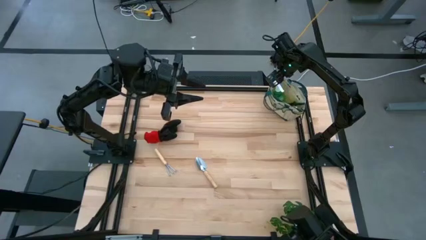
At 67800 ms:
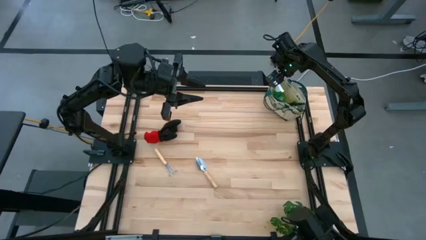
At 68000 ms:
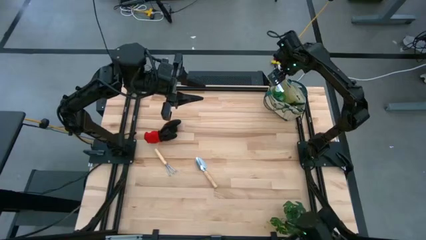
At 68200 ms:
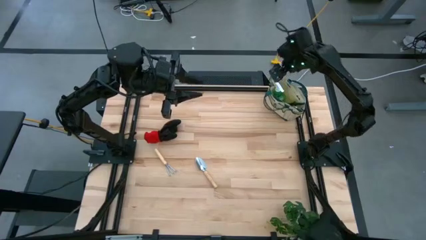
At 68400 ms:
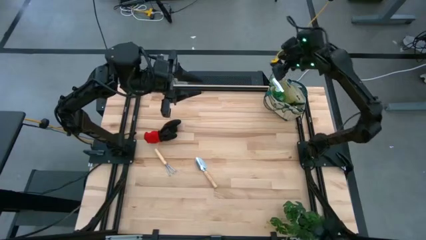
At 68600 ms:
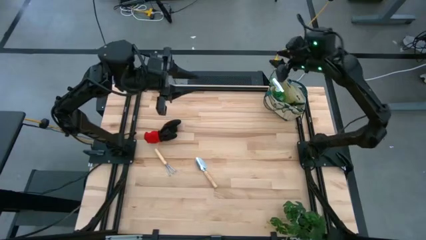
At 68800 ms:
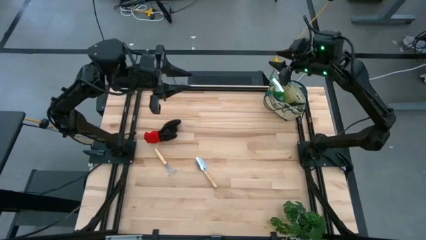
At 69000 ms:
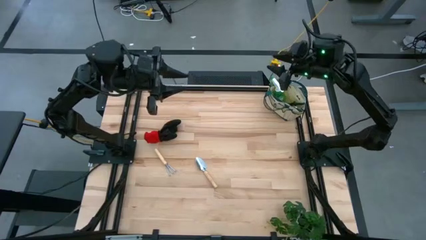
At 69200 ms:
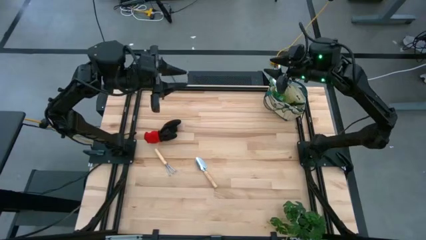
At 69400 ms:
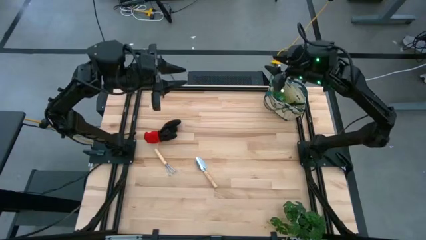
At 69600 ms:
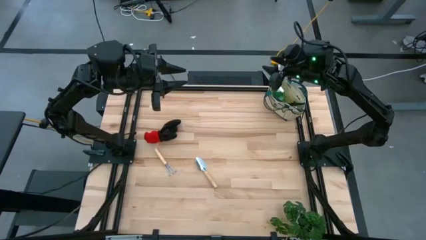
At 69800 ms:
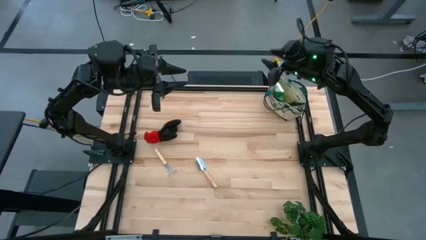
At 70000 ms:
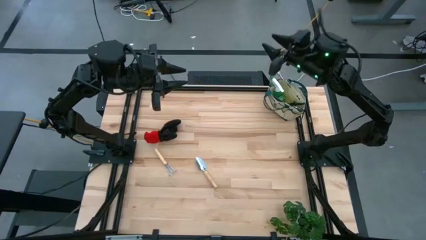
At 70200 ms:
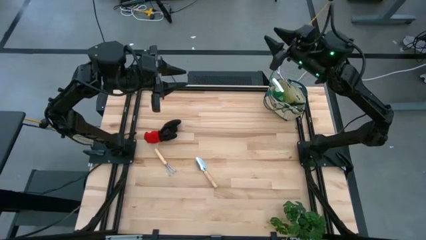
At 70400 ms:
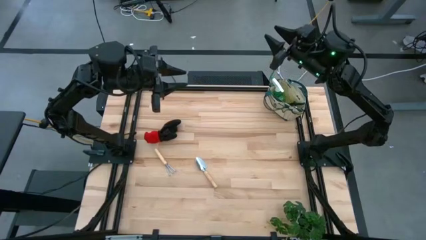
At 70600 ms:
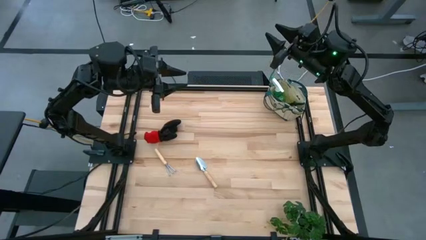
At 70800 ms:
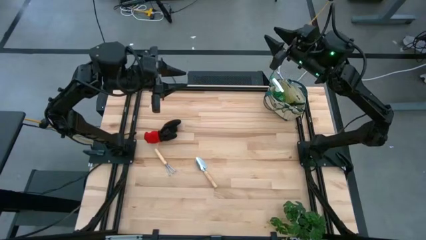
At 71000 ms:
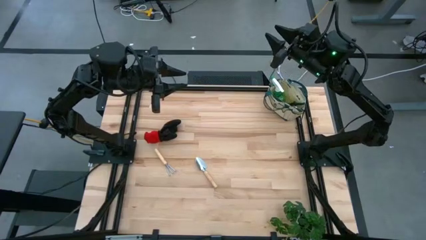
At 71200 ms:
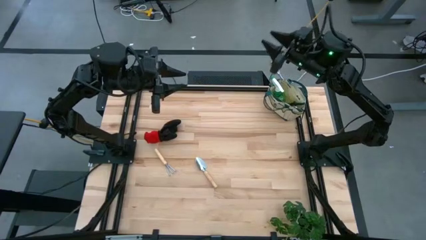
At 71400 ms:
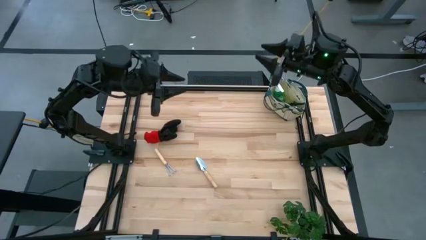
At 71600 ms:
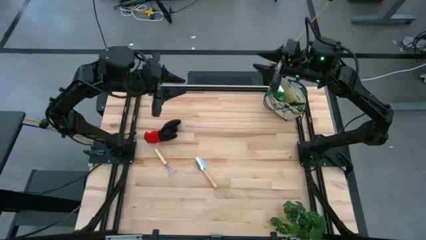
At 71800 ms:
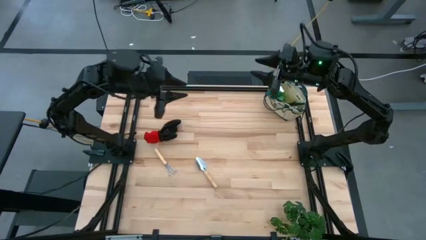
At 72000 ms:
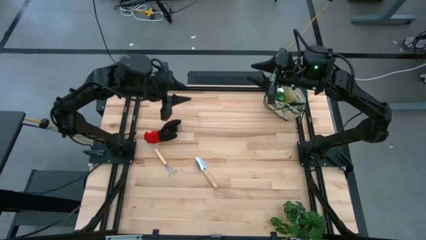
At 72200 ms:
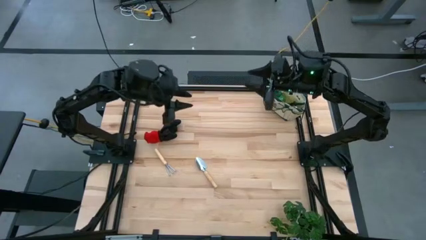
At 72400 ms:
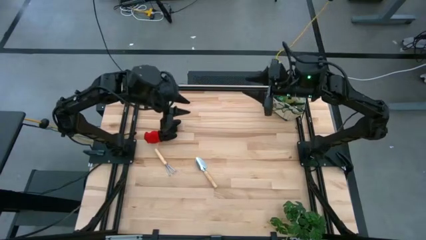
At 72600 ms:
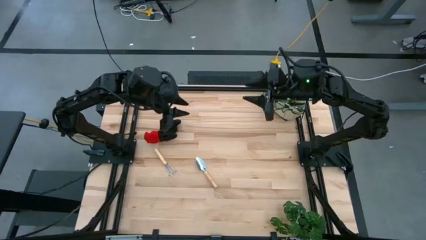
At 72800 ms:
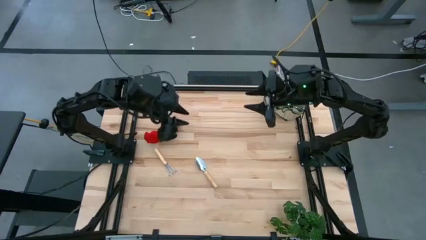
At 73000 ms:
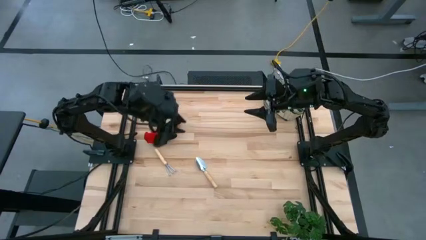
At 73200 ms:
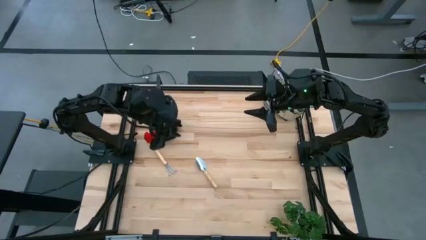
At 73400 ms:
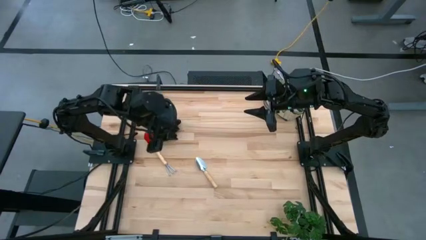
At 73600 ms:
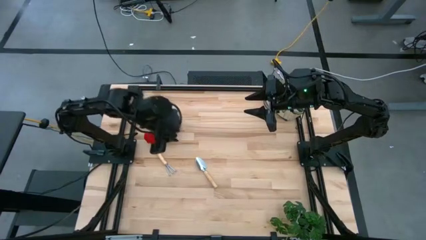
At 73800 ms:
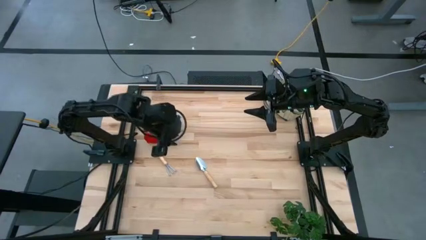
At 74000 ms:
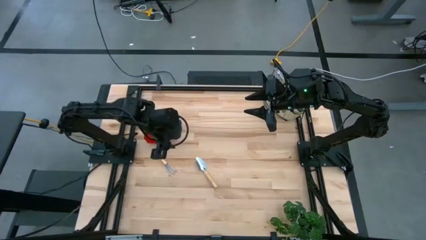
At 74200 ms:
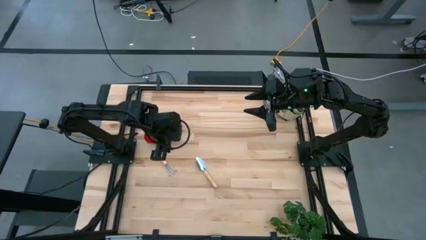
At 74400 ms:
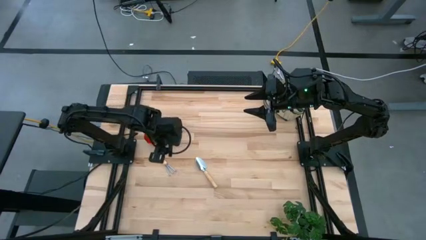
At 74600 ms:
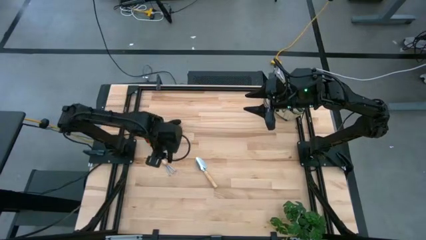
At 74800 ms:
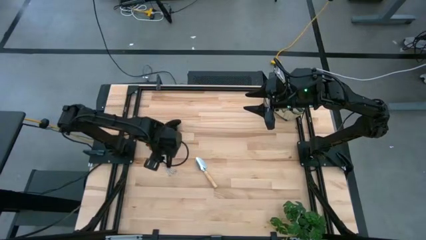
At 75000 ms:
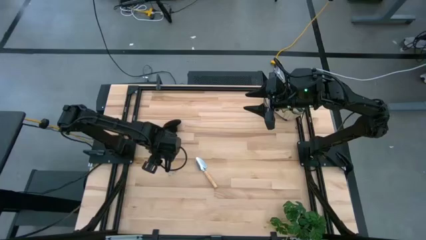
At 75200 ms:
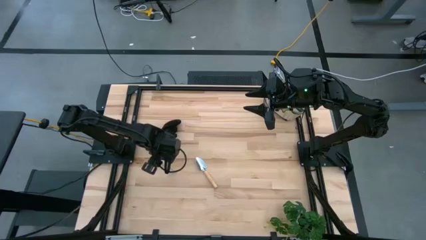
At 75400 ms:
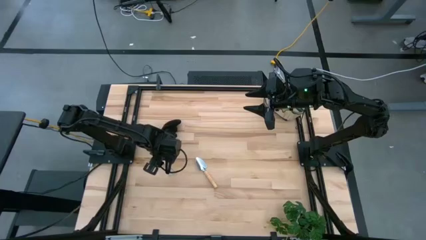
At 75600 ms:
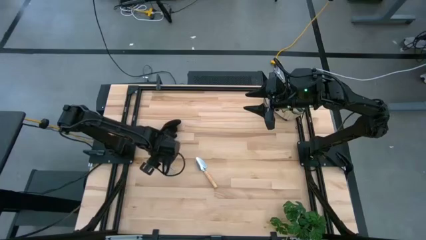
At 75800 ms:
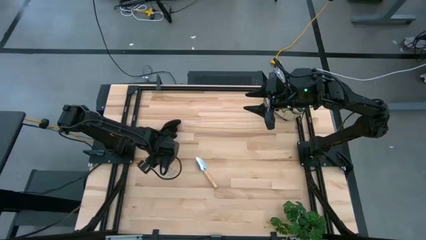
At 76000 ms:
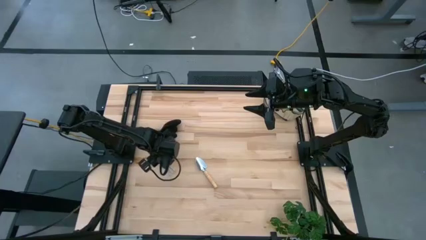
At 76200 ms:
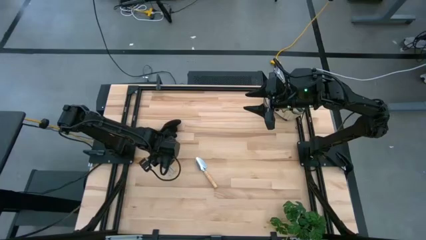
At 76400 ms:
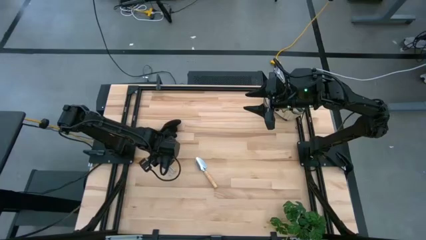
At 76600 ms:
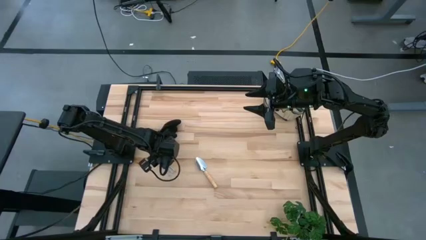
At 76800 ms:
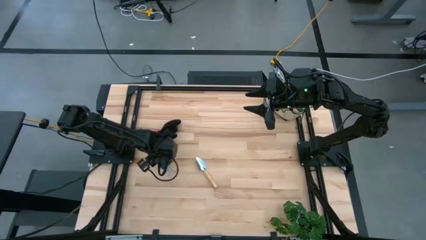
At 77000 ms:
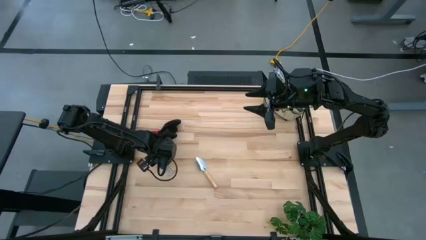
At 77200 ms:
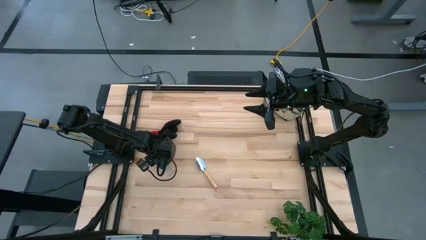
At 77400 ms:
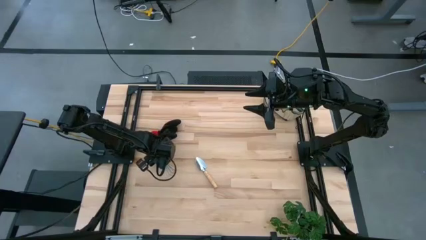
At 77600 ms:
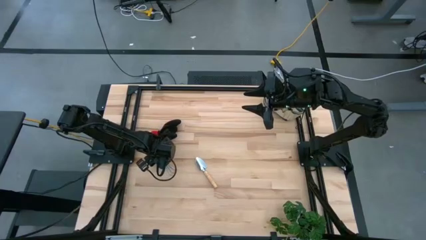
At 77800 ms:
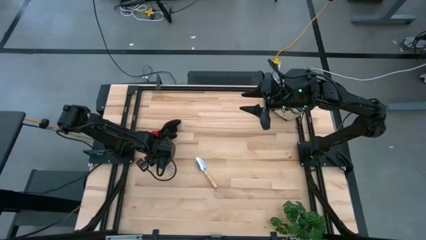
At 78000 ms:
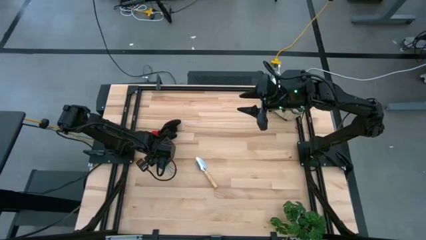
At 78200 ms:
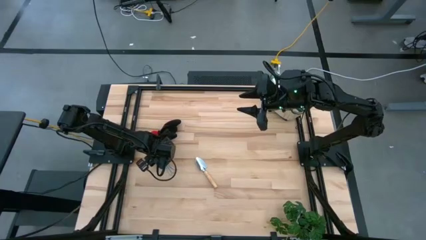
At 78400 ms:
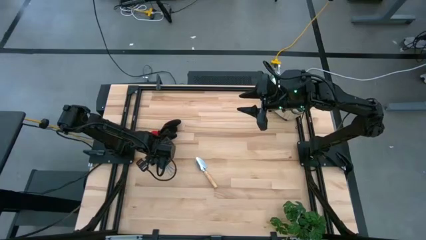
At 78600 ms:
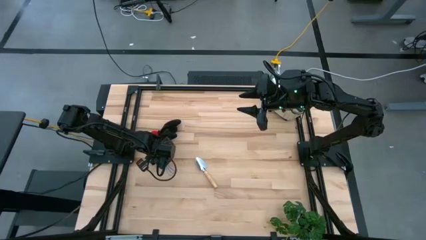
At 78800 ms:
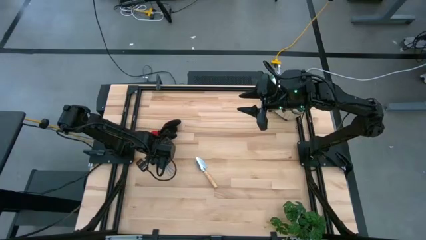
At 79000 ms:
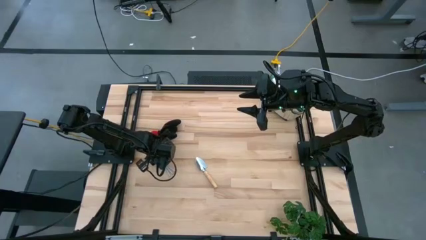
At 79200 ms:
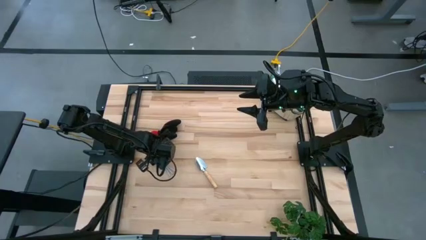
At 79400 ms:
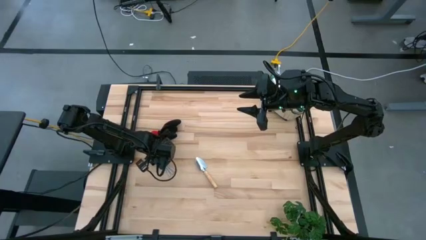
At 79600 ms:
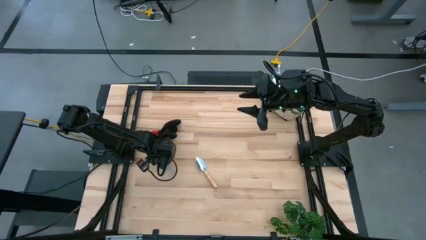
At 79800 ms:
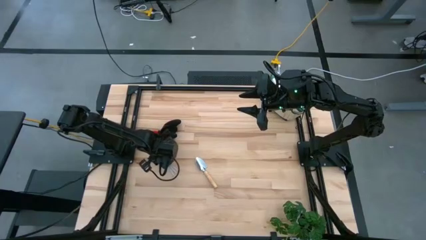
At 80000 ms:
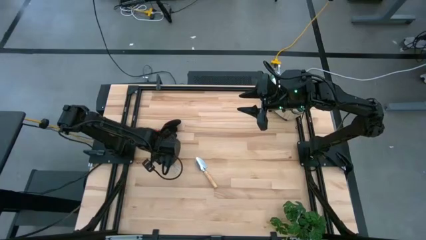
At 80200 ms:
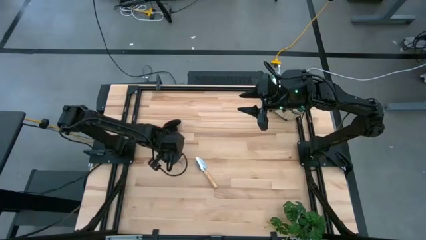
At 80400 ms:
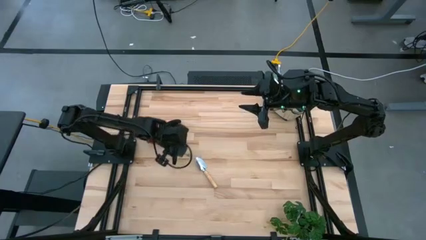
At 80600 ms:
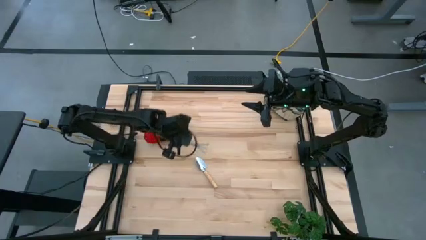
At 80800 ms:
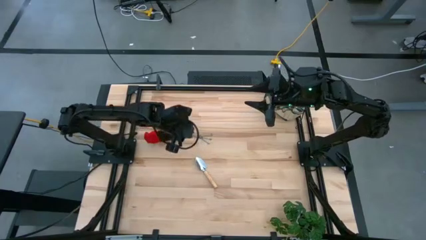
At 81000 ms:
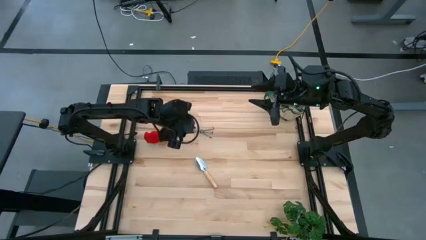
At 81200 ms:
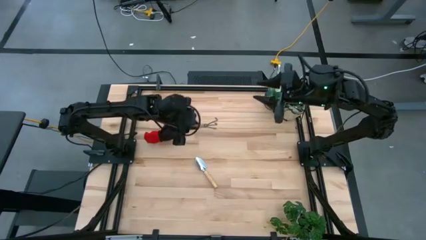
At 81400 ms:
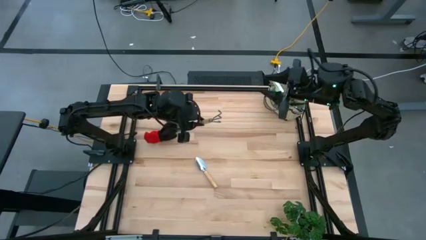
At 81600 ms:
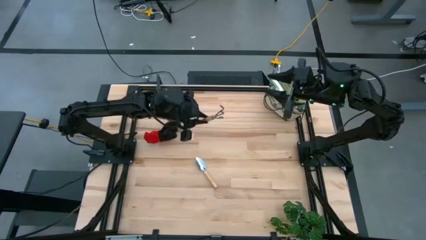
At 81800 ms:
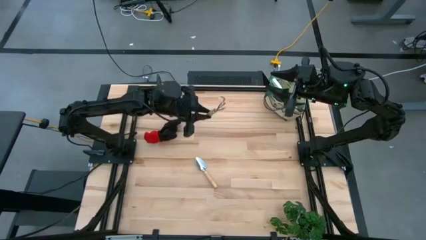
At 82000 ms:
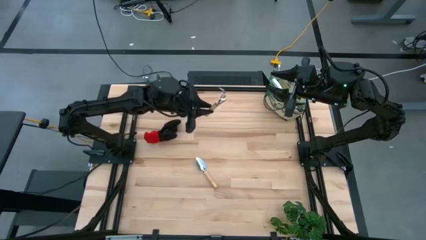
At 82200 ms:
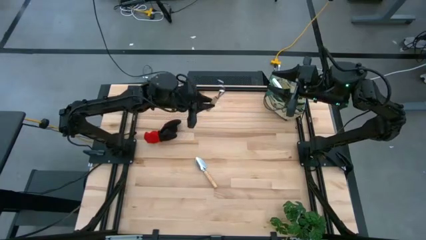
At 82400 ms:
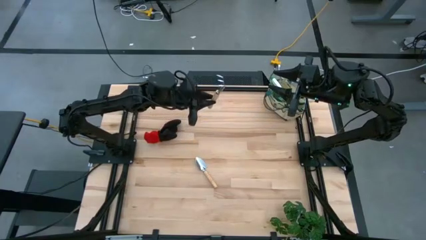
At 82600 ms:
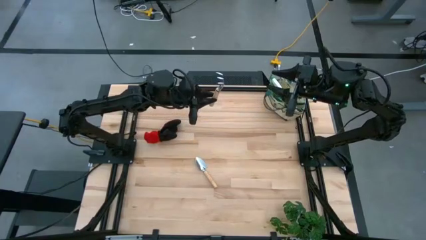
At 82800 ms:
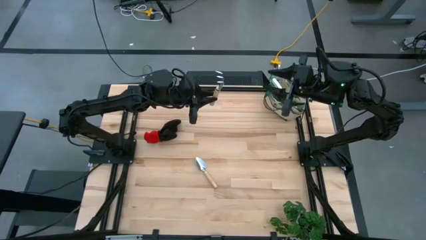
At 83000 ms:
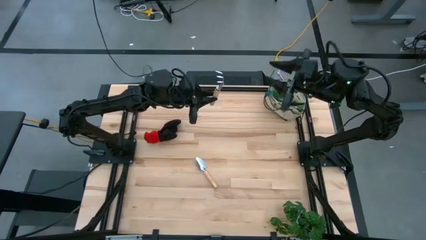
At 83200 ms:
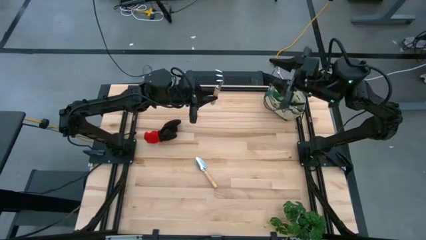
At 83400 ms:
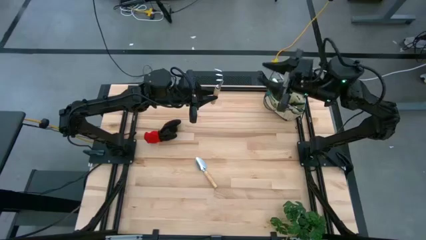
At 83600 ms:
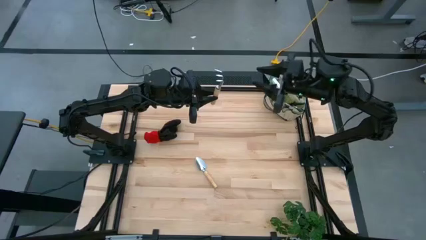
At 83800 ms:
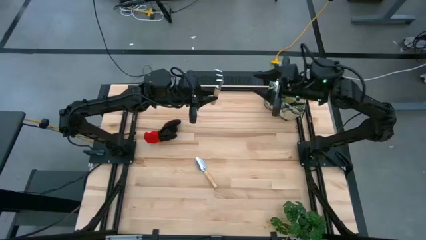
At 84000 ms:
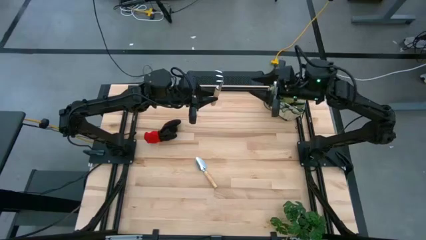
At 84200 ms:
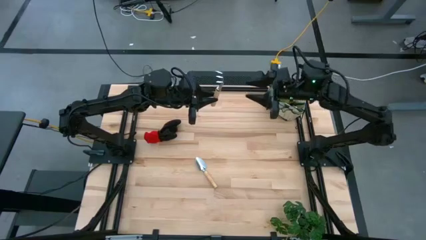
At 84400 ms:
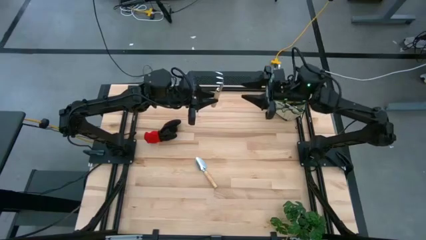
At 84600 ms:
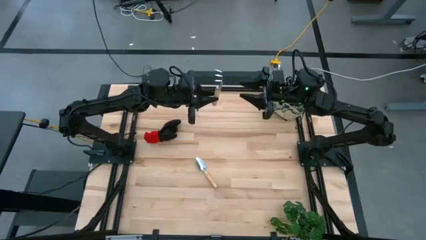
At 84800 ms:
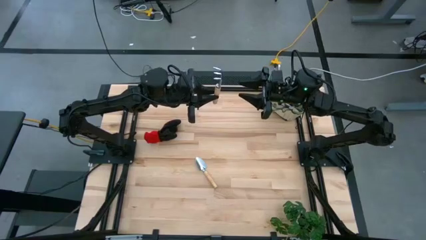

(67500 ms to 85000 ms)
Task: Pick & Place Garden tools in Gardening bag
Put the hand rake into the gardening bag
